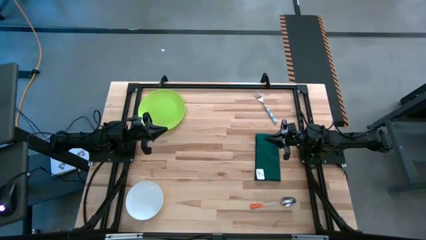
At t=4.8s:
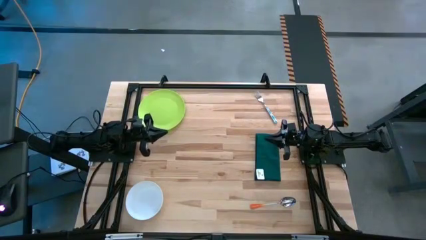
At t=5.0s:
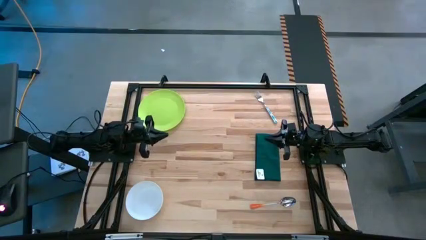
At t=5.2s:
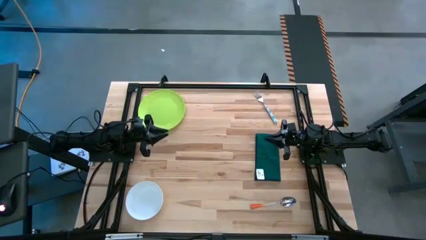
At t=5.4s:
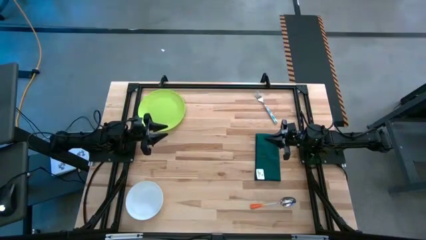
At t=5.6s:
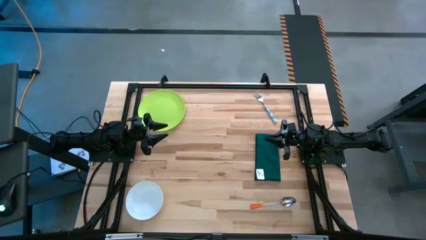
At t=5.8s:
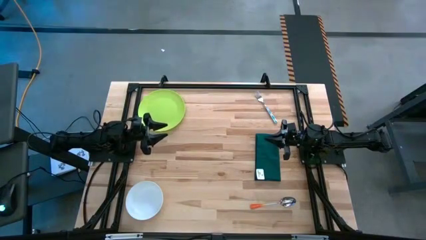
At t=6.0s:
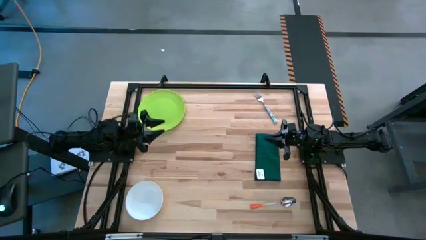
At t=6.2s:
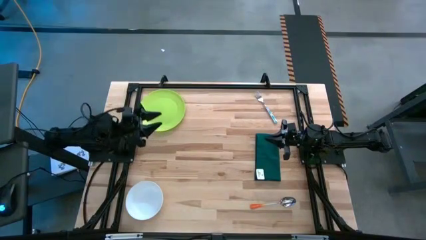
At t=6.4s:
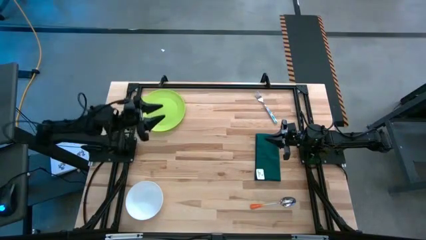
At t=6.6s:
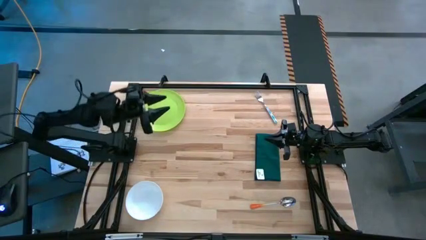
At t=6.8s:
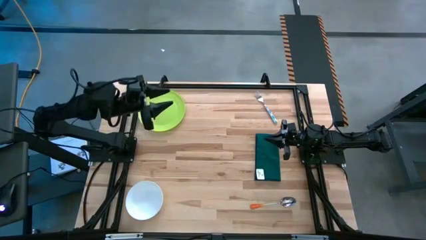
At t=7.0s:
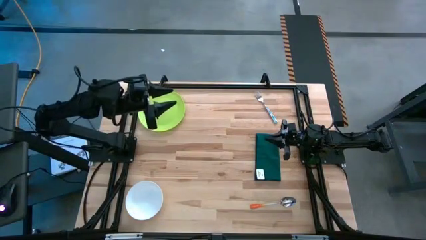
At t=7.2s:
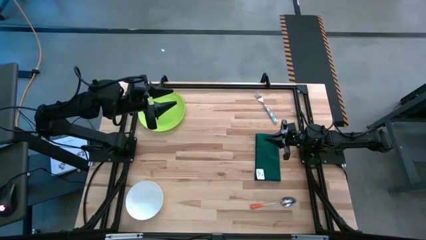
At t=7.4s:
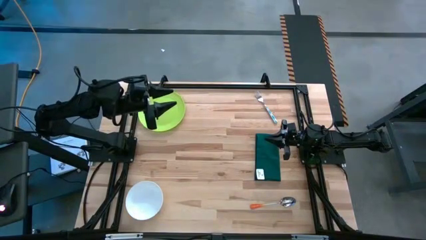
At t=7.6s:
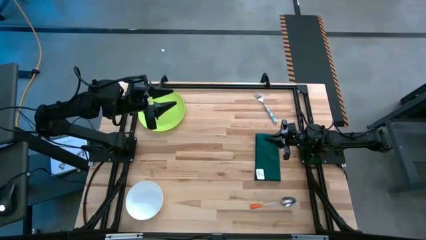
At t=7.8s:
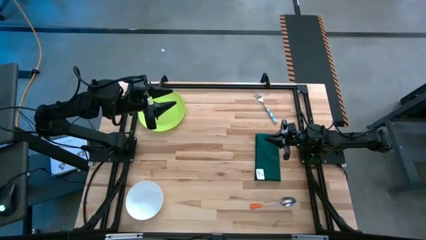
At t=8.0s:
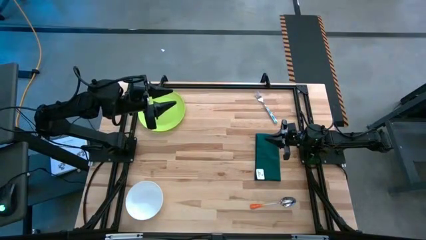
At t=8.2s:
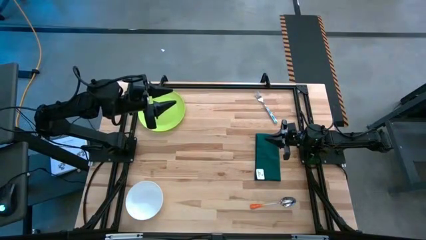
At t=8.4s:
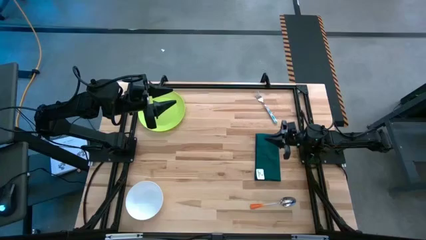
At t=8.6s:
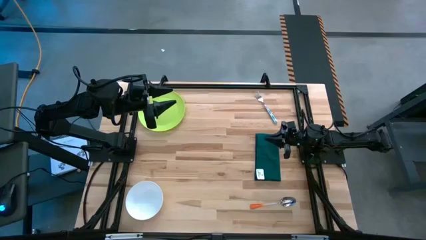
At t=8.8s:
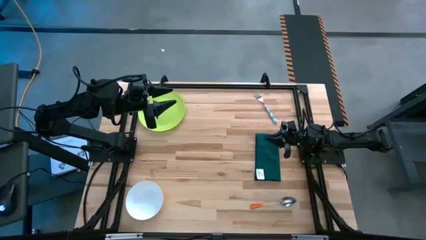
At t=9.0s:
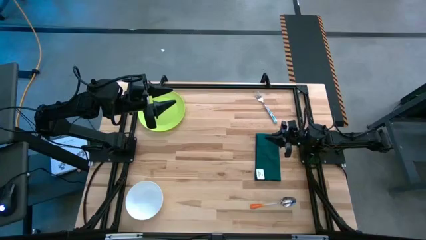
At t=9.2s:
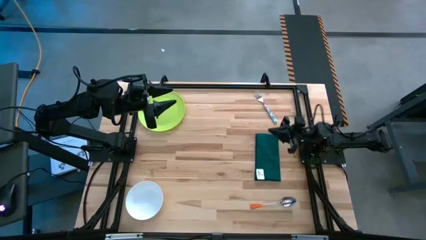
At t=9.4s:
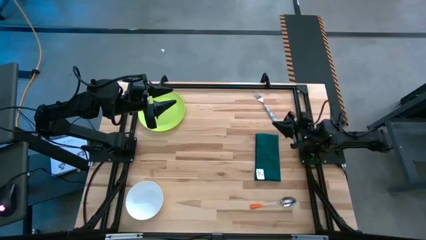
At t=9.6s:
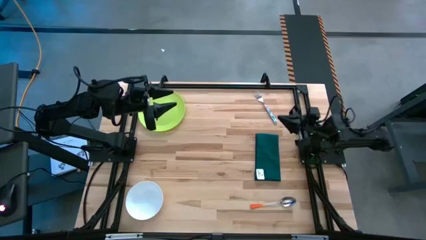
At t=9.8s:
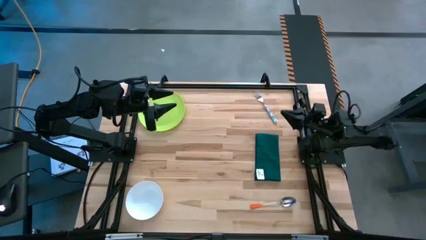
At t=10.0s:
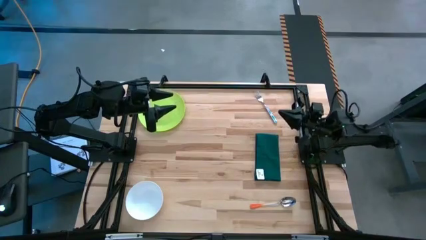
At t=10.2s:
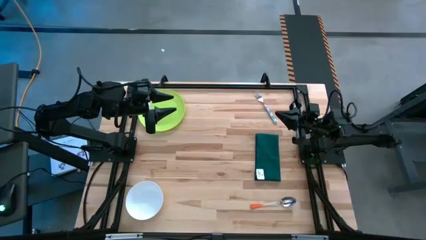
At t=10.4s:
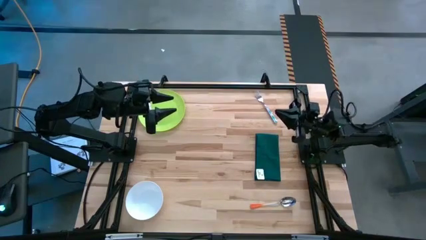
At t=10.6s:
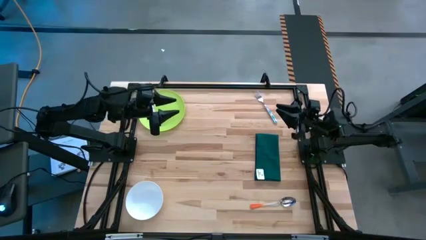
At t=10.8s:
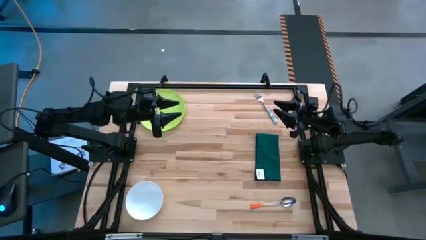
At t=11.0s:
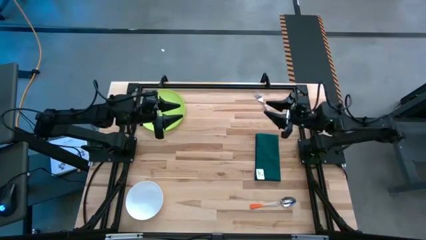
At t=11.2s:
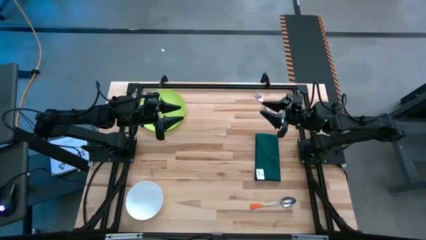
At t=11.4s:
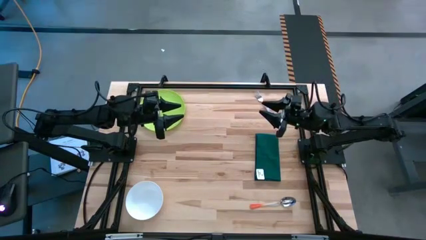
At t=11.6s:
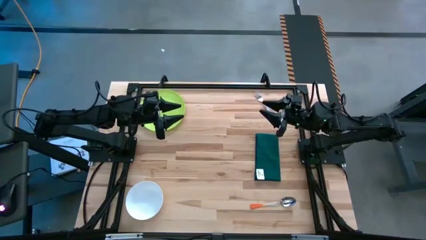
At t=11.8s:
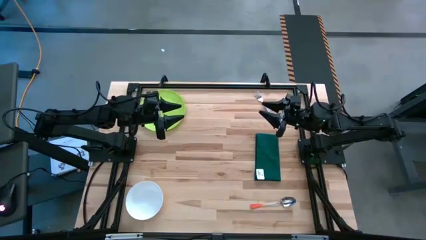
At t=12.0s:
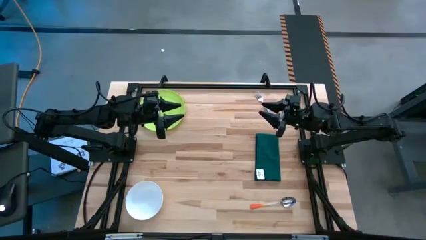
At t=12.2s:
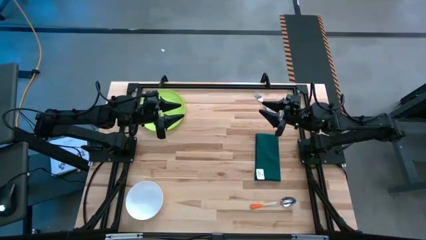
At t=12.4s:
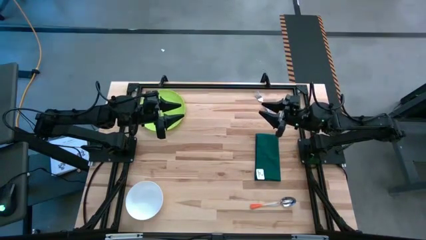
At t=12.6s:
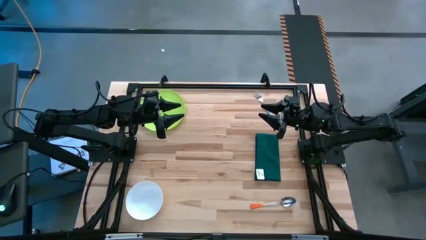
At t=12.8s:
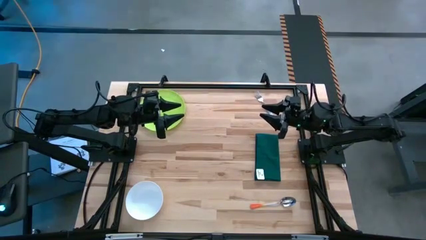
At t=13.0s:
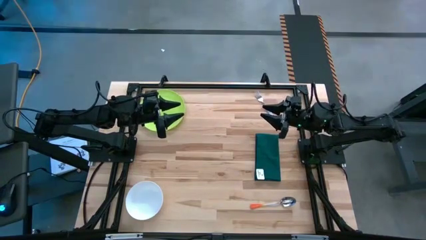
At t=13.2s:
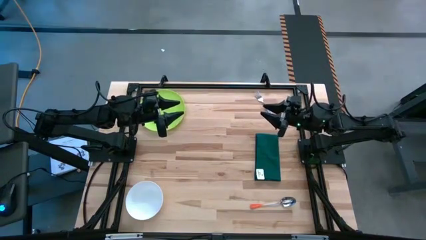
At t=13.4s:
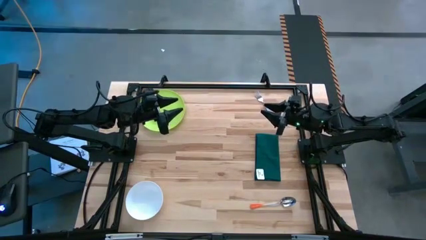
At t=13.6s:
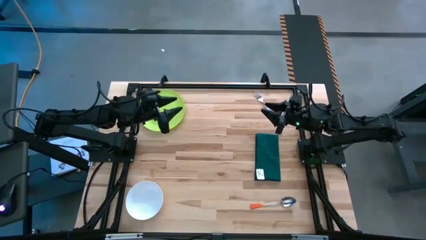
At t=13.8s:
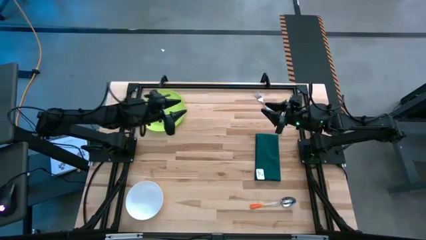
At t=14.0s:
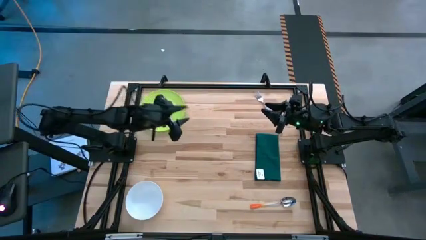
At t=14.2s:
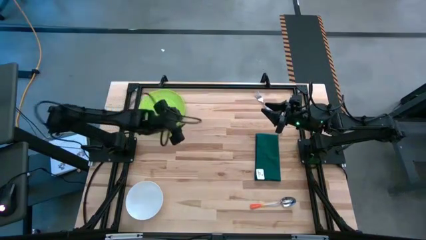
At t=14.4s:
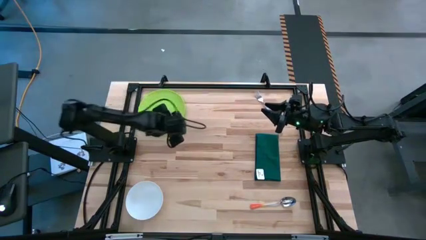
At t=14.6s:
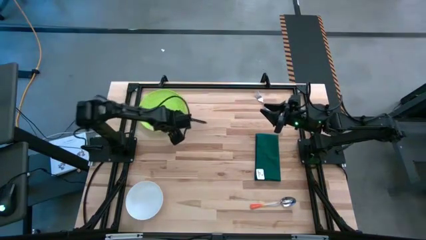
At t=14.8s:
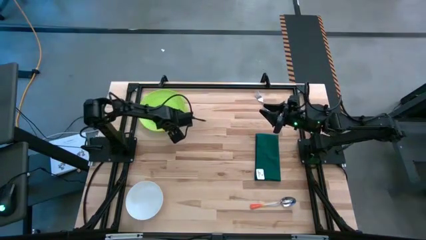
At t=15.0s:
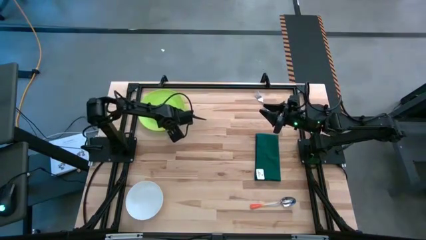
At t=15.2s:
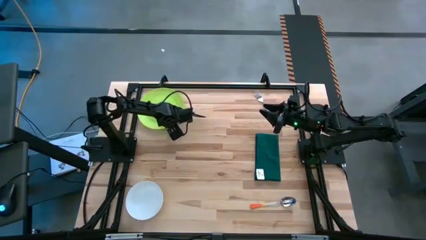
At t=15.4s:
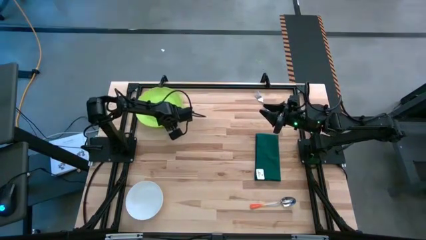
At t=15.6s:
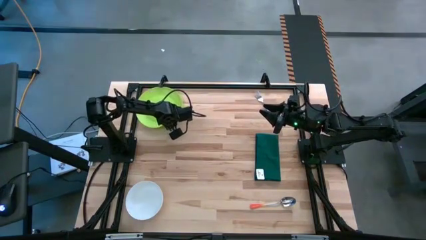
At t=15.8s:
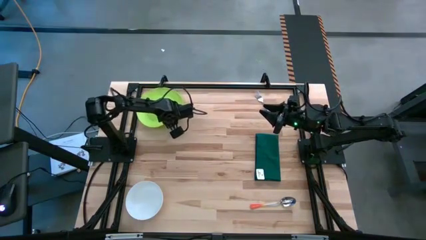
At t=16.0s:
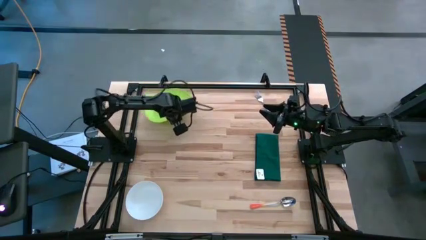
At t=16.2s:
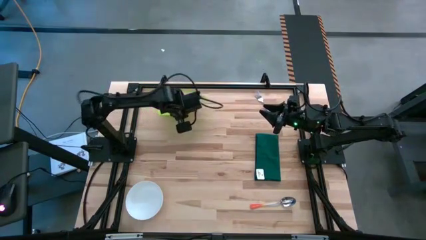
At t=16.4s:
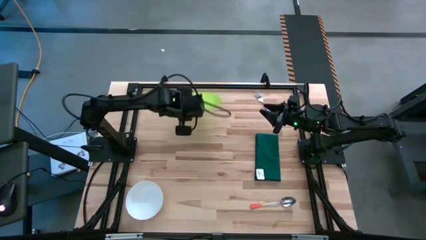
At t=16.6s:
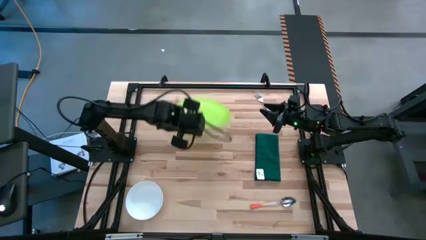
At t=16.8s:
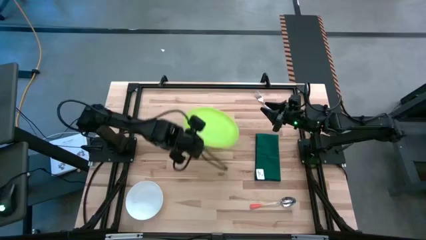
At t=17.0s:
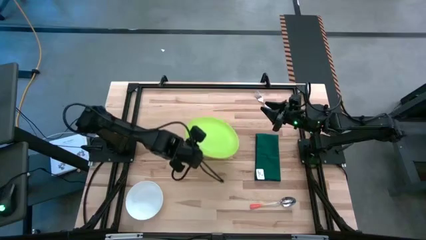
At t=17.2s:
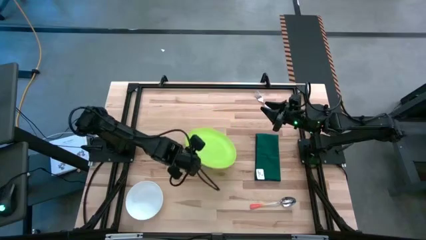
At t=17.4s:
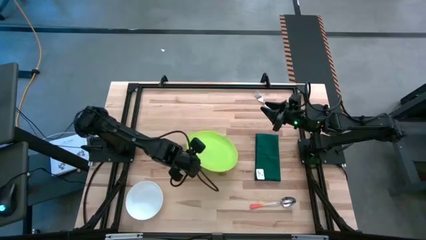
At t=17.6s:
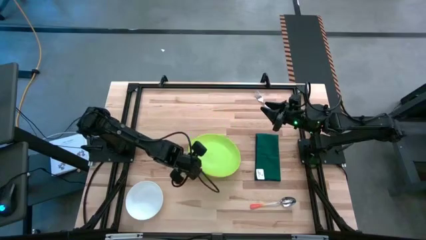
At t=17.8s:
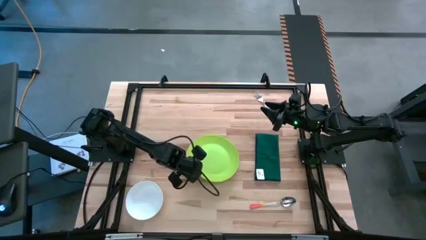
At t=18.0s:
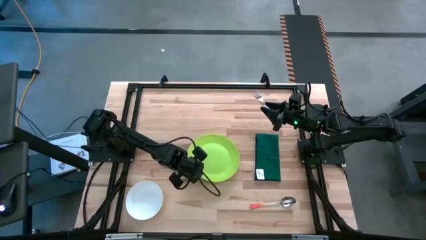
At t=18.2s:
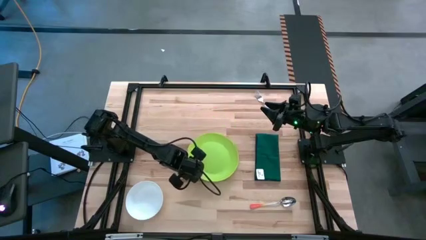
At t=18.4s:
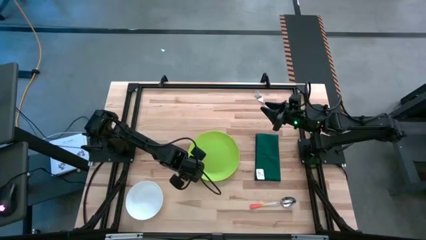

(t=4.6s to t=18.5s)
Task: Set table place
Move the green plate to the center of the table
